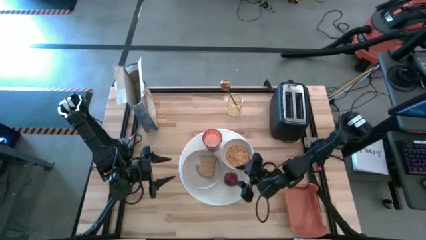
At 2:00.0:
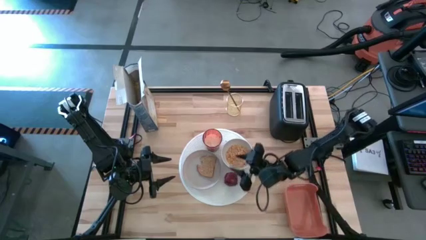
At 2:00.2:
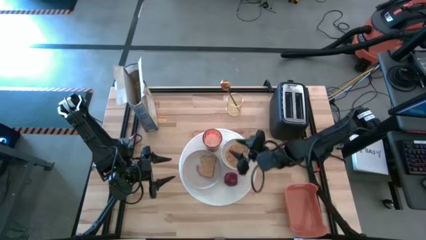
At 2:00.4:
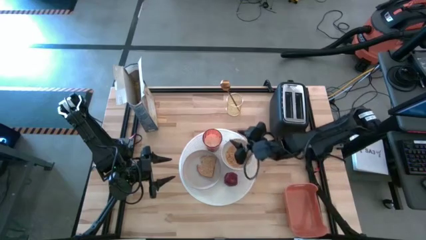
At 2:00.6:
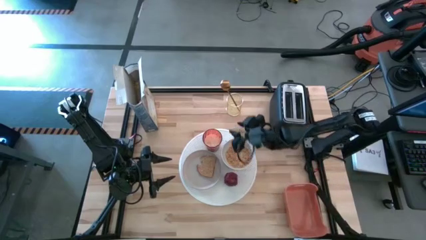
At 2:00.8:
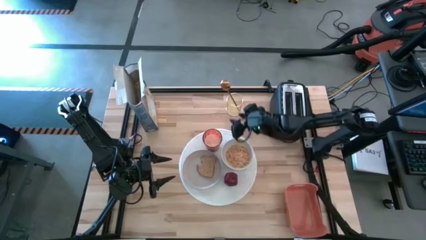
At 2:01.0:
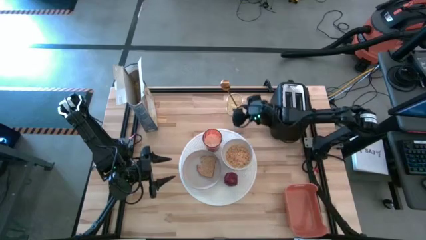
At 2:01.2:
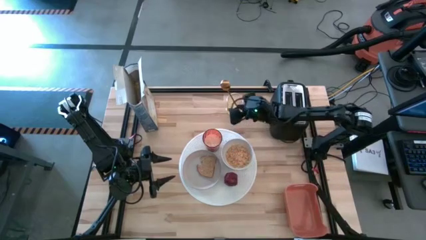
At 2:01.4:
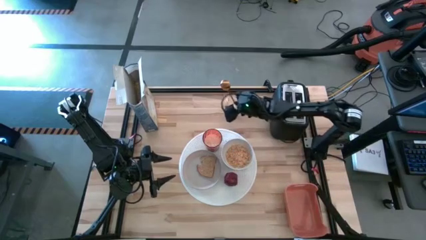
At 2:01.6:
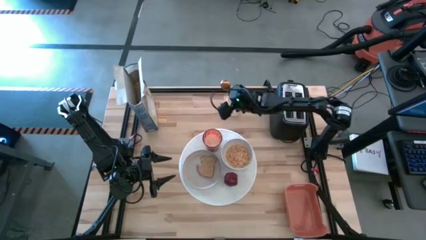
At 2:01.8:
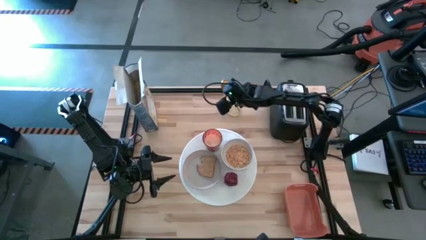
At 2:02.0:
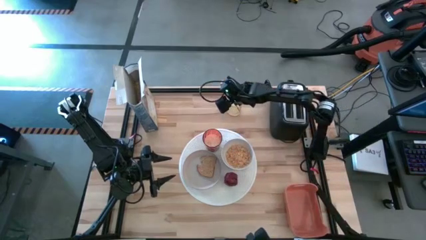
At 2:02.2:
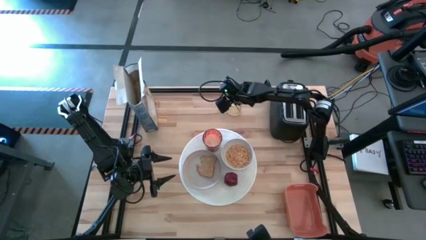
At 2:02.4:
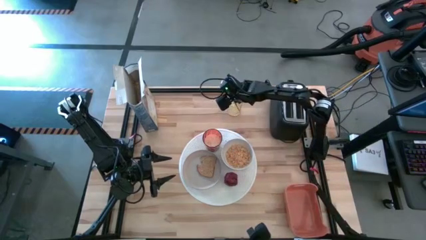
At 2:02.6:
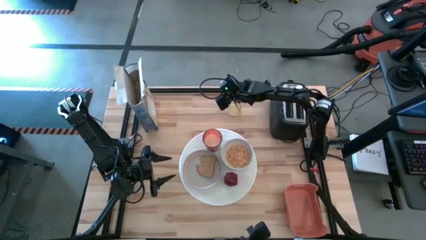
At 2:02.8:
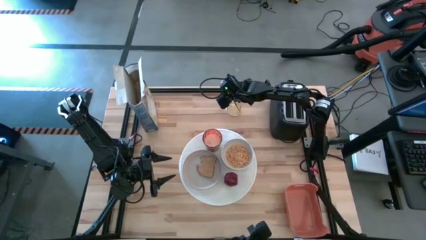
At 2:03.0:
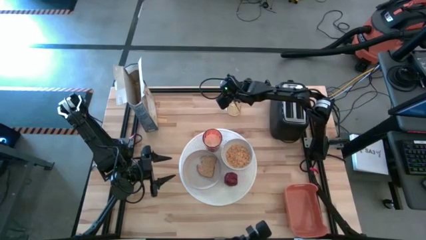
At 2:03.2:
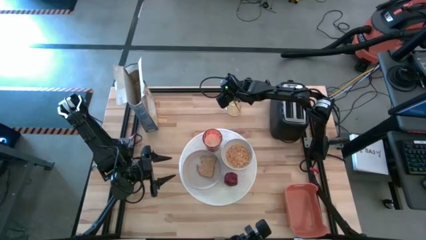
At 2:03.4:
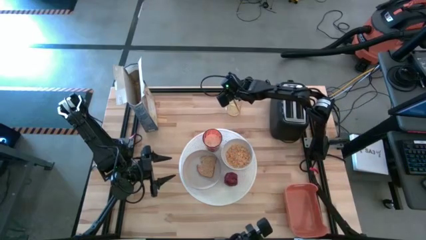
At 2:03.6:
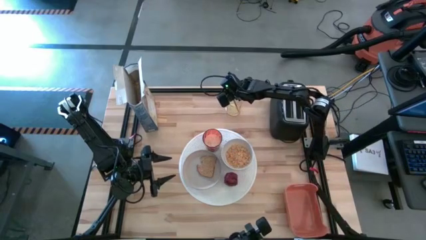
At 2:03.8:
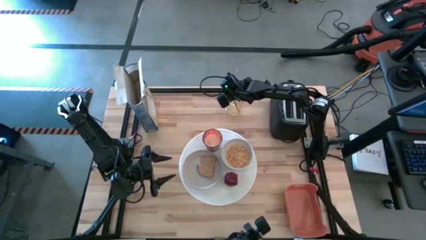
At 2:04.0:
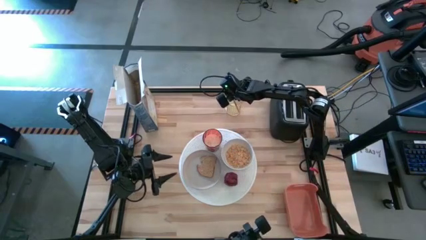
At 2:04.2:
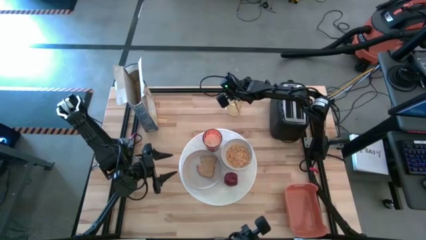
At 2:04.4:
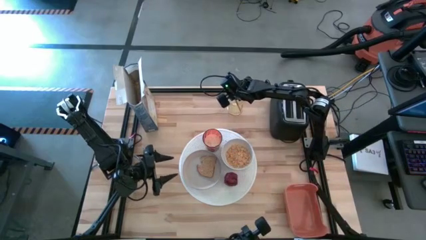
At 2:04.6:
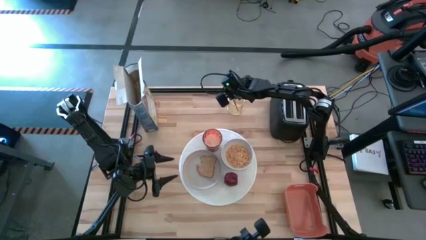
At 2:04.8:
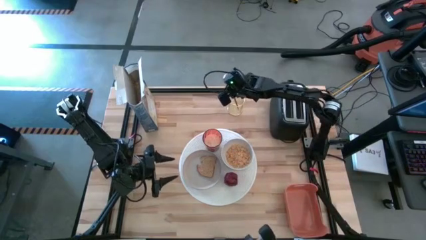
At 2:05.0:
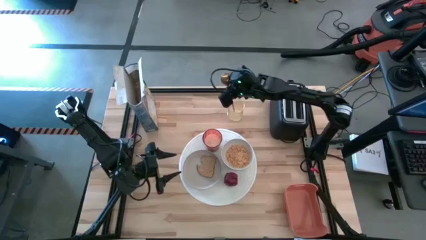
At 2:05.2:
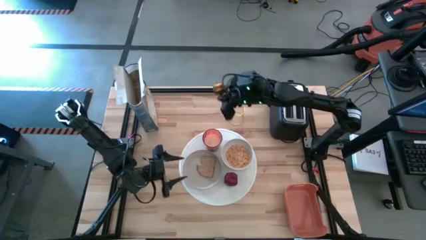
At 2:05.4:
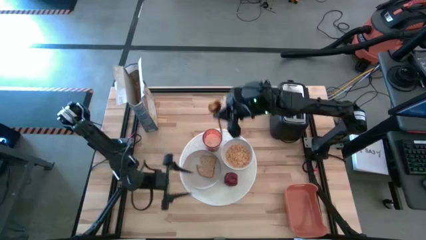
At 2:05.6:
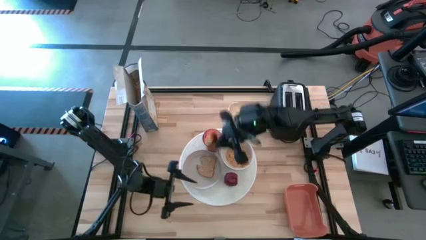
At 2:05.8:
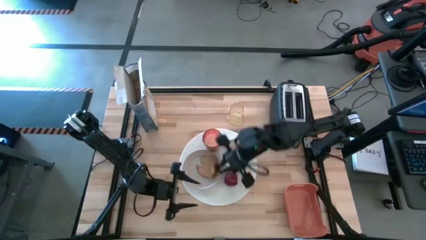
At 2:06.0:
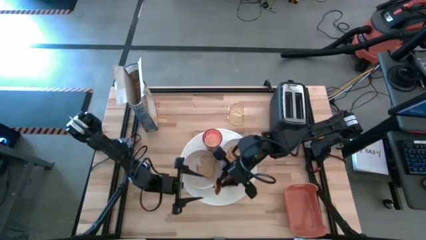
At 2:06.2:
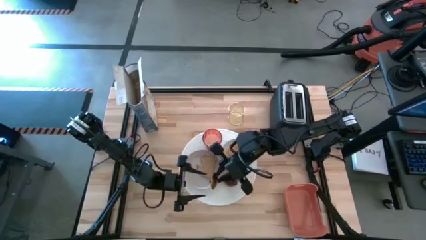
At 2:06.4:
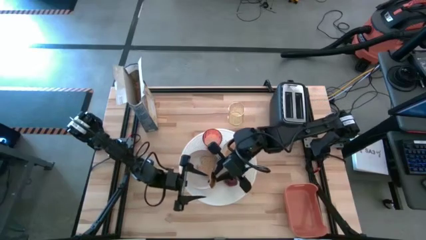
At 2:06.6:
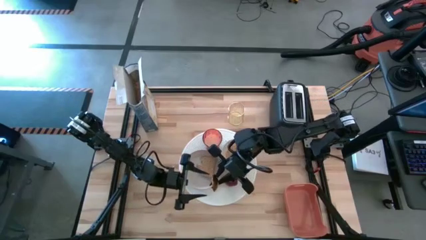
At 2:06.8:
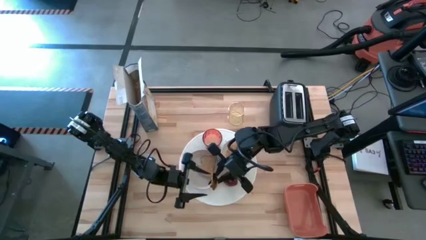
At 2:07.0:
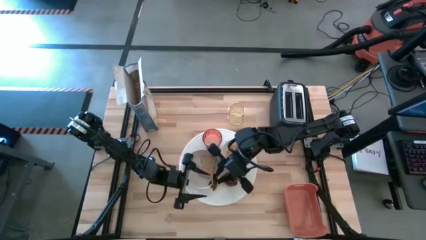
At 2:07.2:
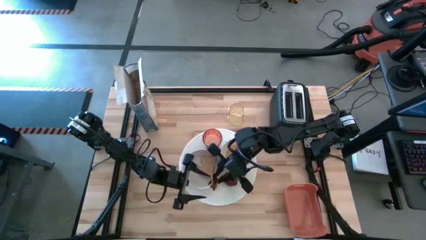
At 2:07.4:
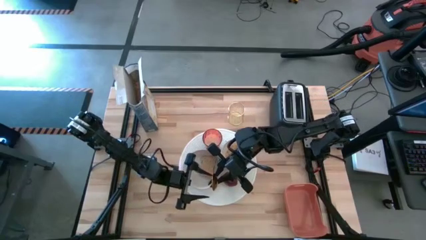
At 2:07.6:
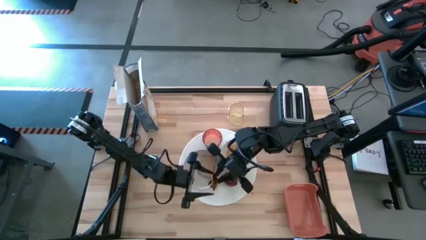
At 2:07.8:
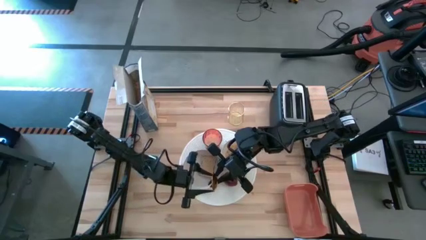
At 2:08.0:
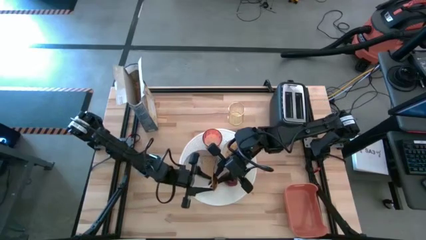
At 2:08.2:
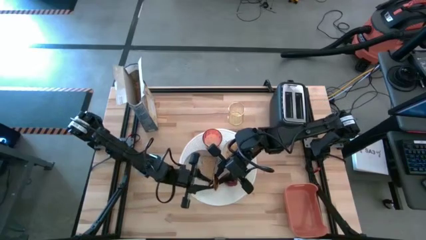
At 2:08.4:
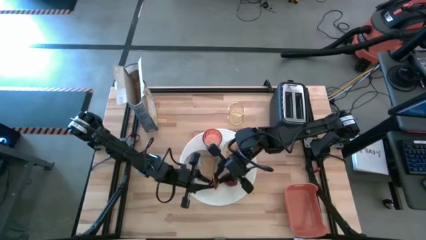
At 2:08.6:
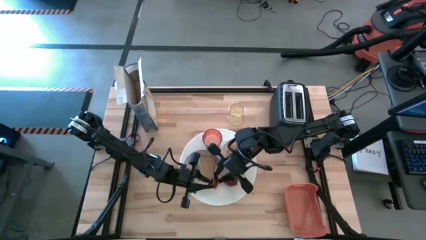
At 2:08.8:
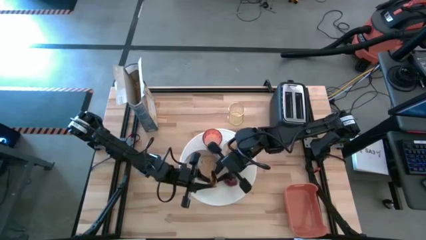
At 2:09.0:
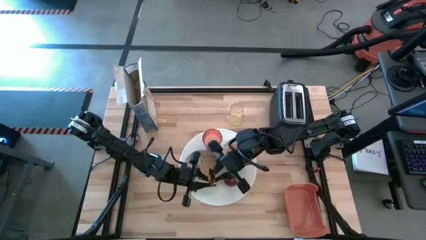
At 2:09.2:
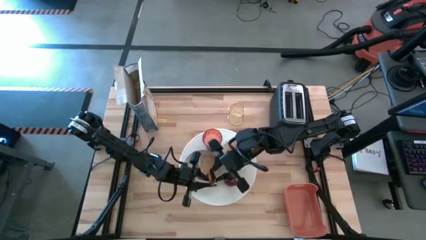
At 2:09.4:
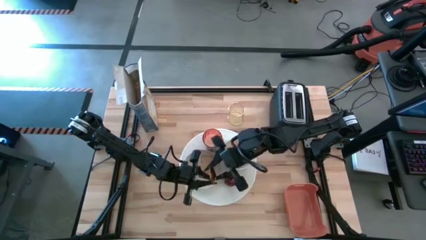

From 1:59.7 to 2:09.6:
Task: Arrange a breakfast setting
Put the gold spoon on the white placemat to the right side of the white bowl

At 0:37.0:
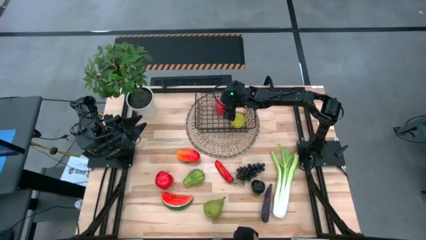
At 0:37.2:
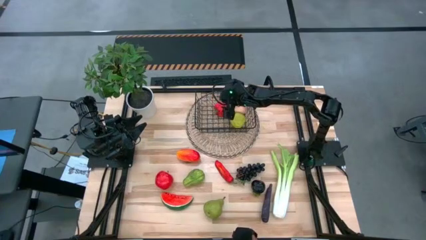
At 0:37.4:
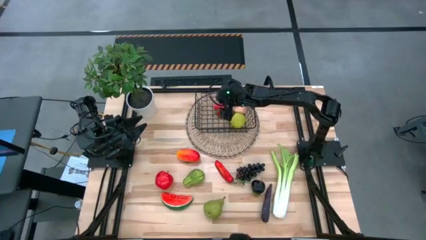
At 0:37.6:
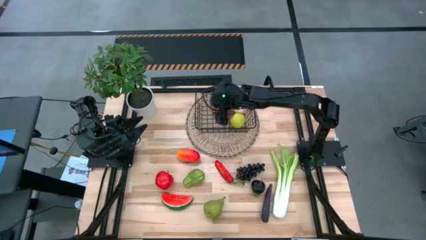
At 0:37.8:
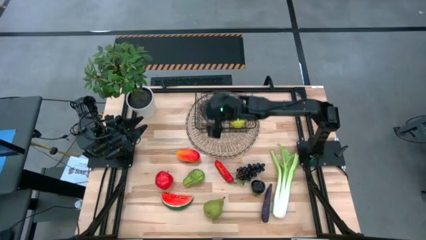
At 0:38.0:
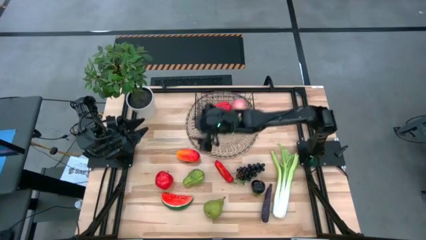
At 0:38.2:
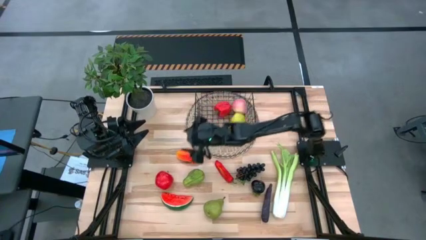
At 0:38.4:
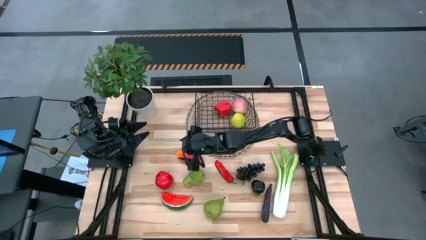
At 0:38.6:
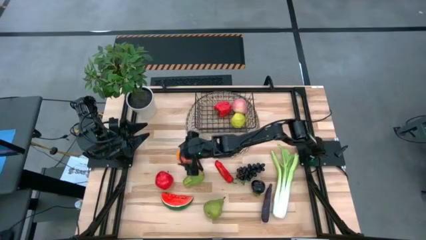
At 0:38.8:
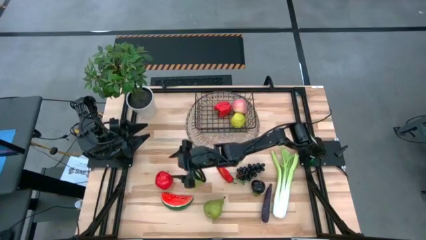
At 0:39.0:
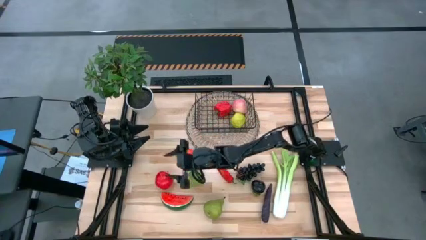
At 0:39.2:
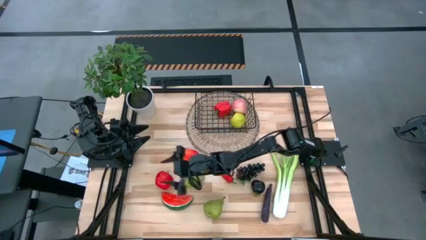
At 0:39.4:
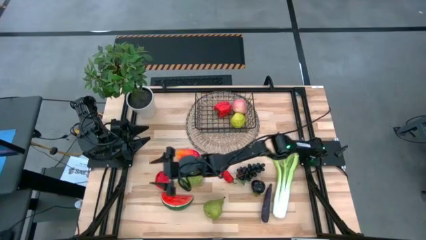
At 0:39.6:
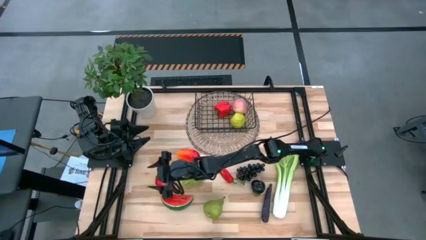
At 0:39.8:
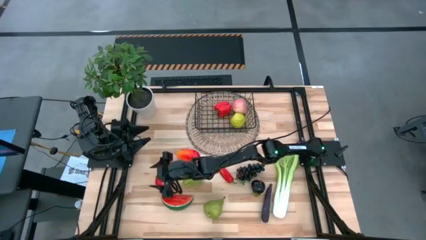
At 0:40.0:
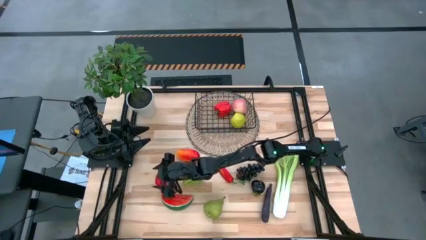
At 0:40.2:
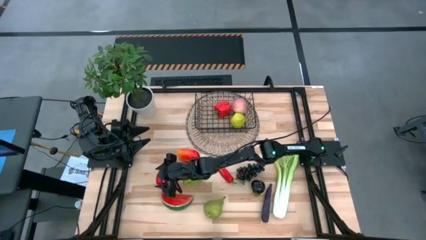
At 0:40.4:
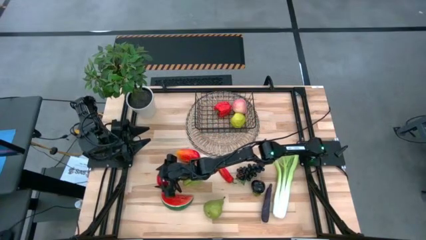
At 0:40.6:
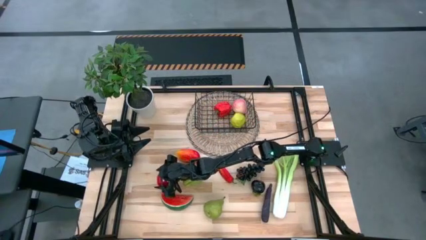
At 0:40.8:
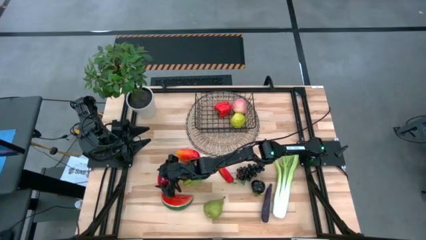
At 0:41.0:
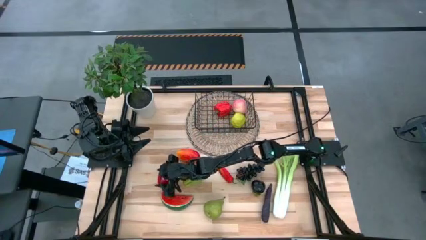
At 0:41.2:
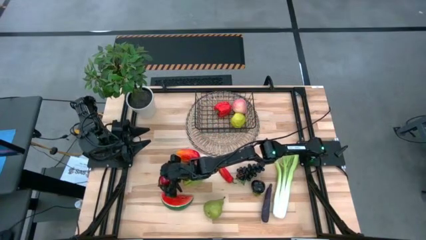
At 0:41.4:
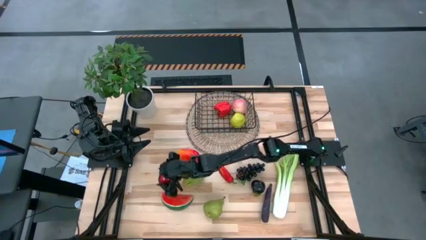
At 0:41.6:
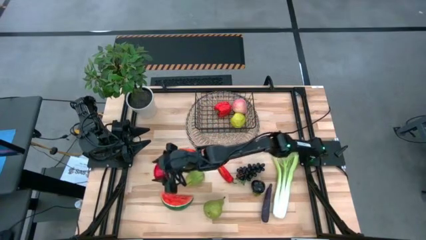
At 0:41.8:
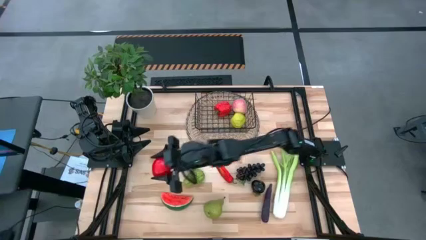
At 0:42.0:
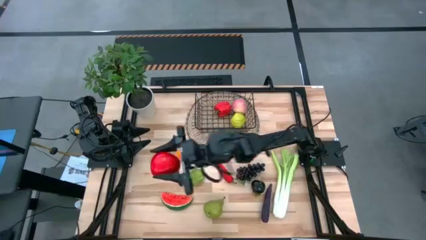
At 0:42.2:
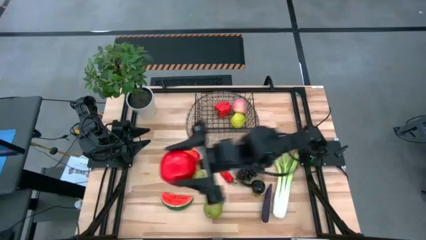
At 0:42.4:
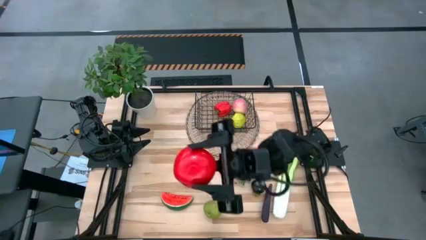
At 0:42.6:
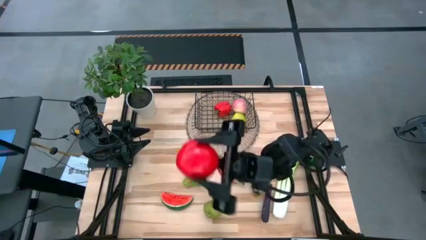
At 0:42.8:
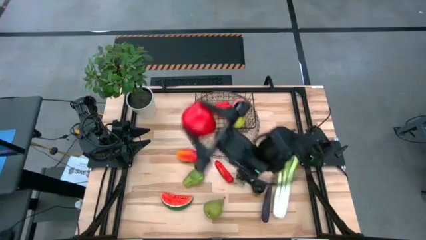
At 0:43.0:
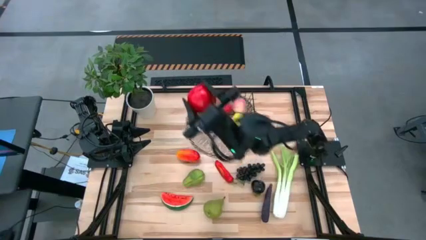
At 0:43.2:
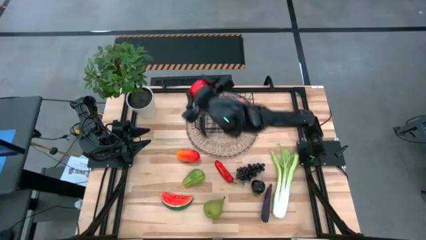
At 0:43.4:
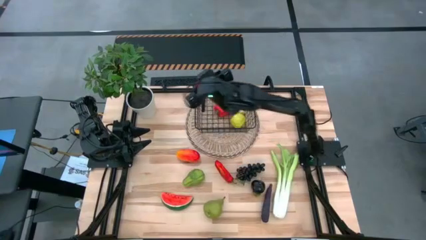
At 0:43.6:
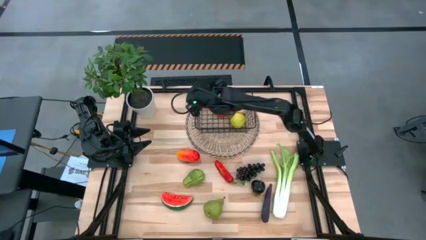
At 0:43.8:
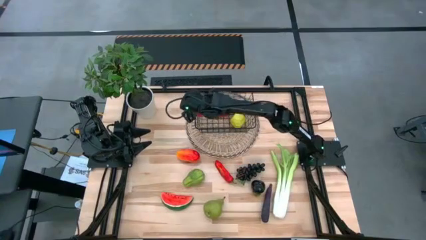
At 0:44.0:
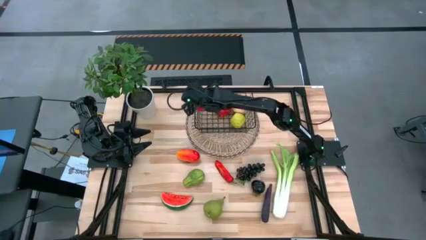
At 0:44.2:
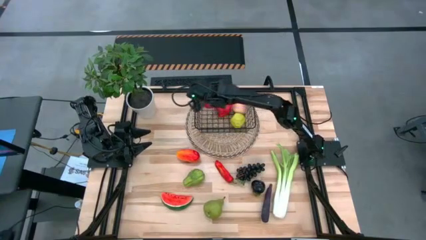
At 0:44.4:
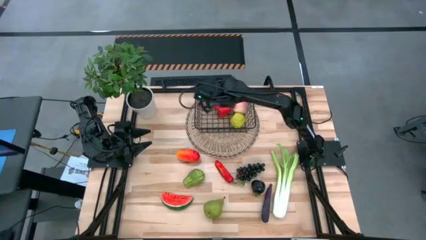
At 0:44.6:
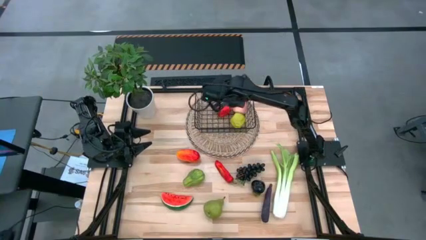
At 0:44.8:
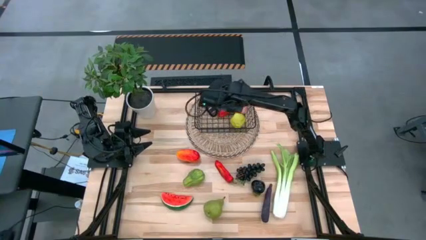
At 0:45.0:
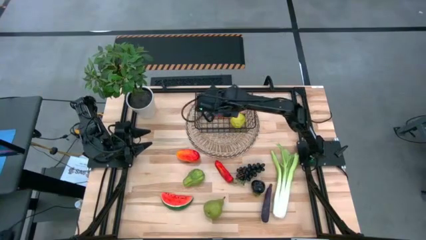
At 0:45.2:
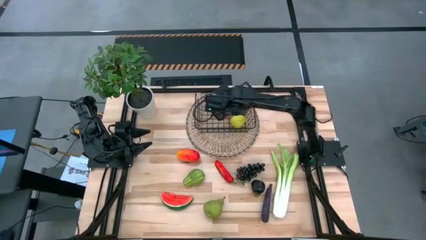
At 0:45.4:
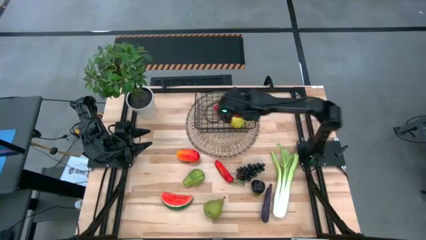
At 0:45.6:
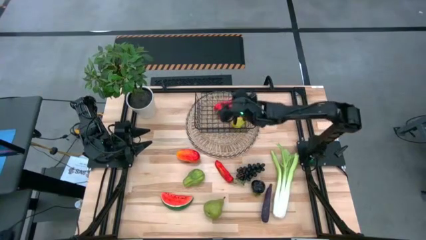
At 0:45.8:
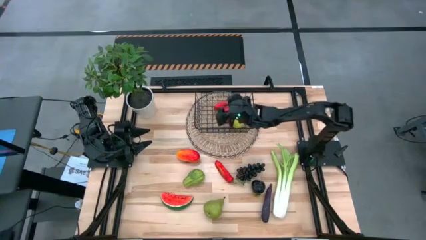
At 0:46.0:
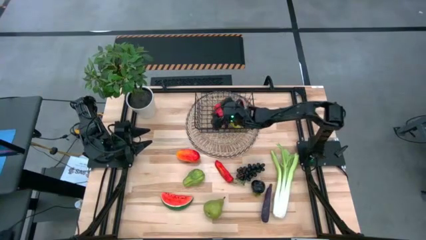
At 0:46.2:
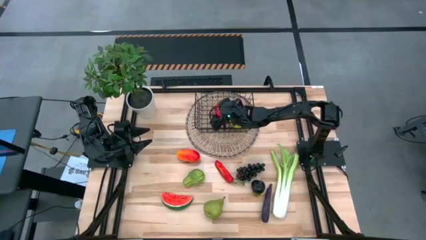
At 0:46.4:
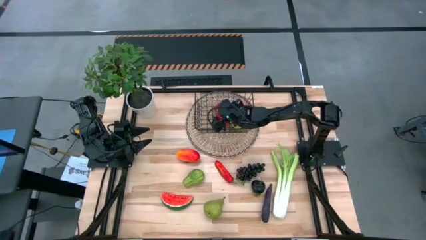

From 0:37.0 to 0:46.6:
Task: Build produce basket
Put the red apple into the black wire basket
